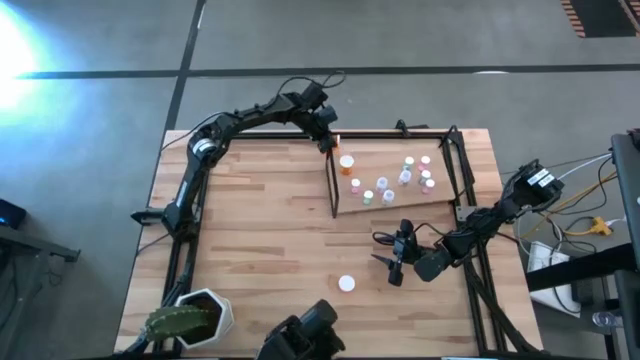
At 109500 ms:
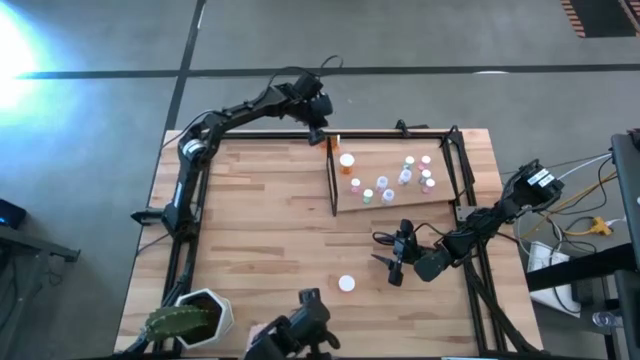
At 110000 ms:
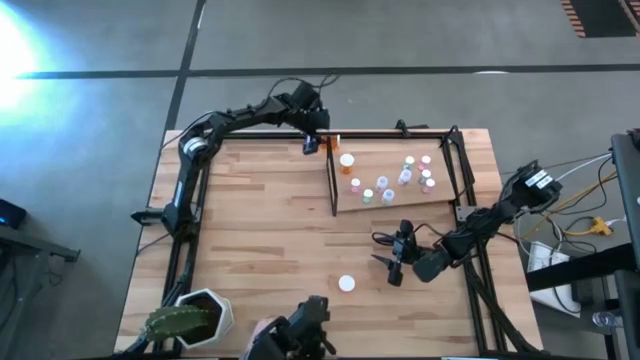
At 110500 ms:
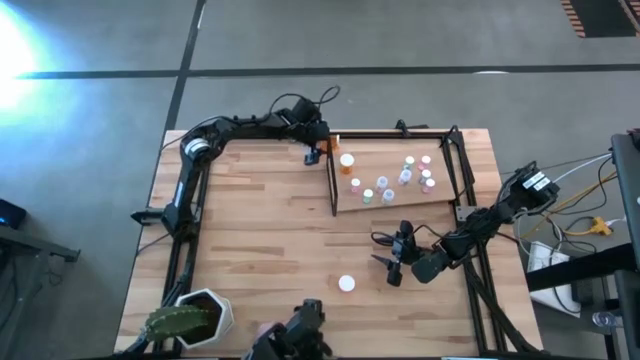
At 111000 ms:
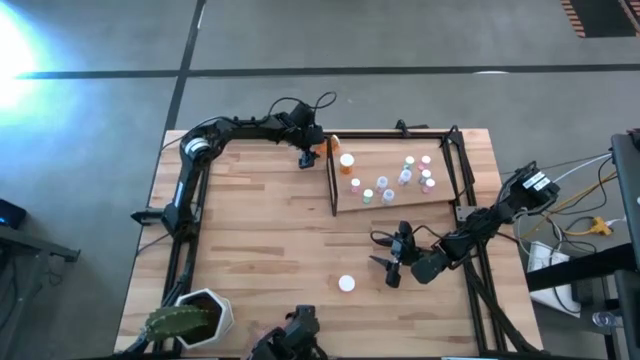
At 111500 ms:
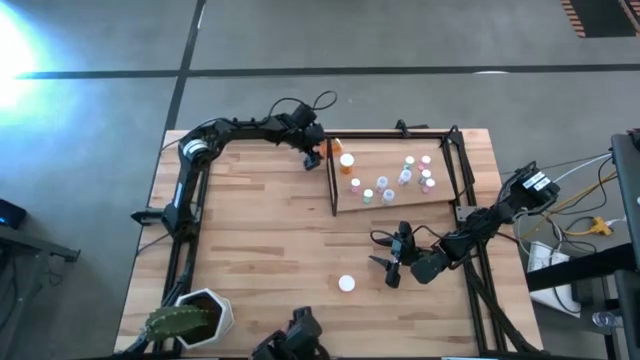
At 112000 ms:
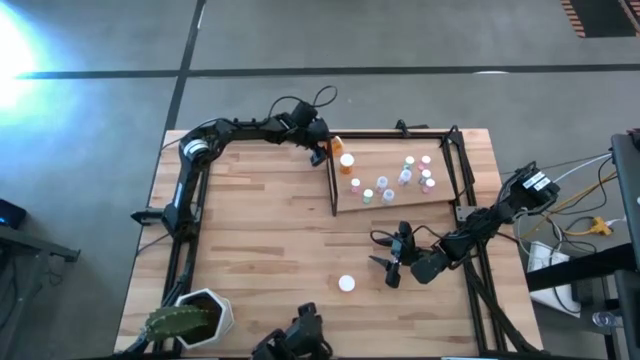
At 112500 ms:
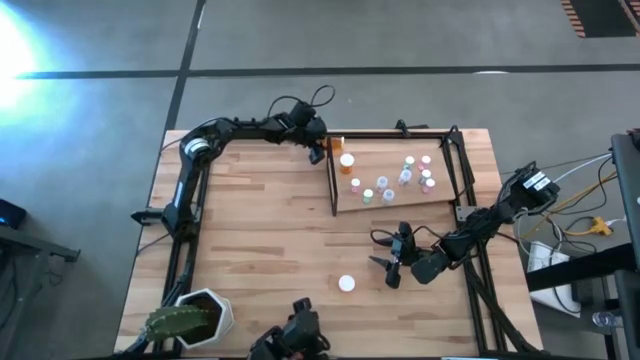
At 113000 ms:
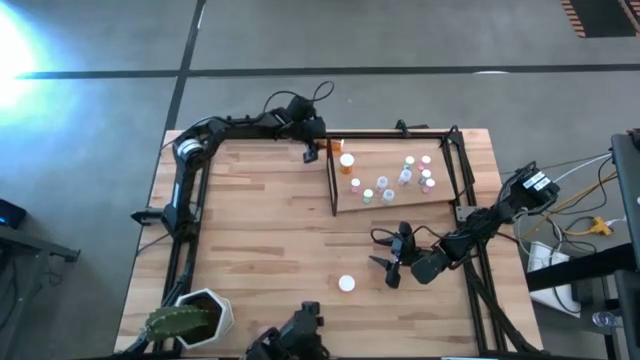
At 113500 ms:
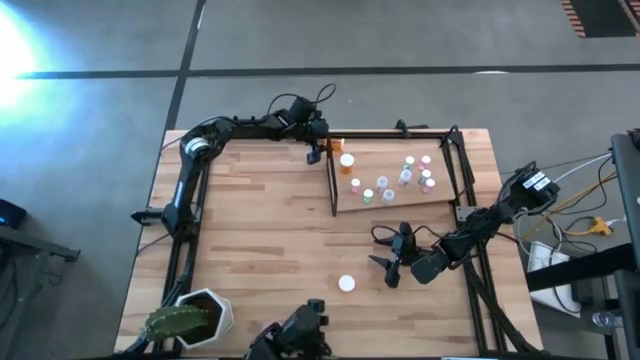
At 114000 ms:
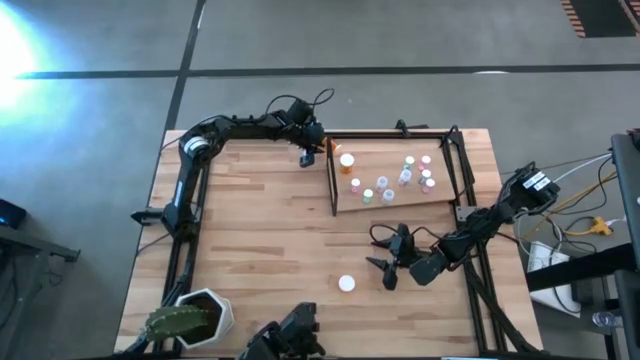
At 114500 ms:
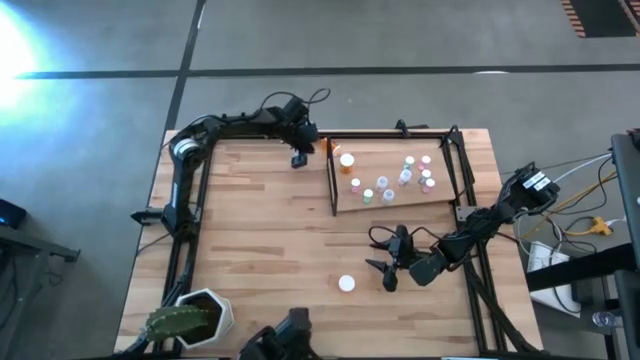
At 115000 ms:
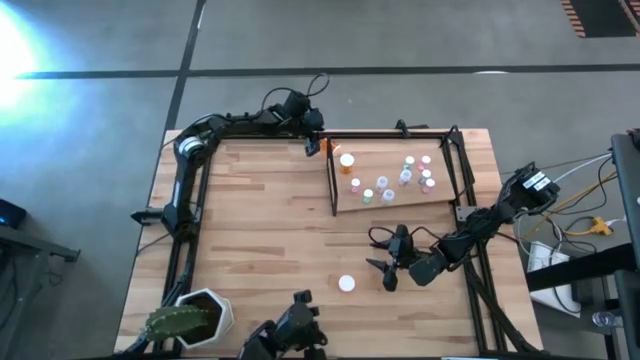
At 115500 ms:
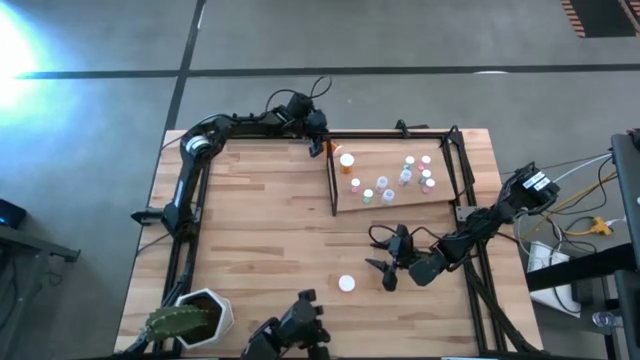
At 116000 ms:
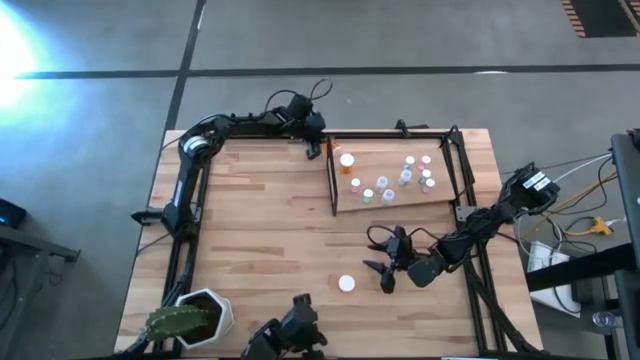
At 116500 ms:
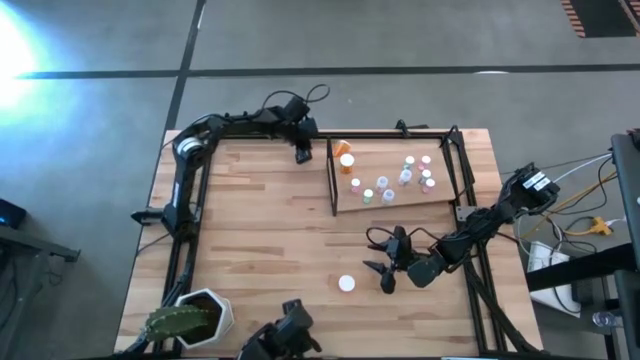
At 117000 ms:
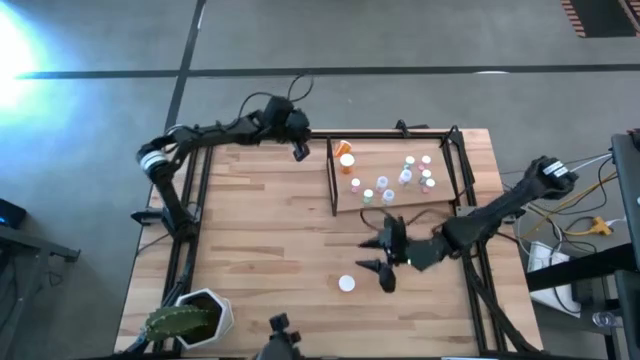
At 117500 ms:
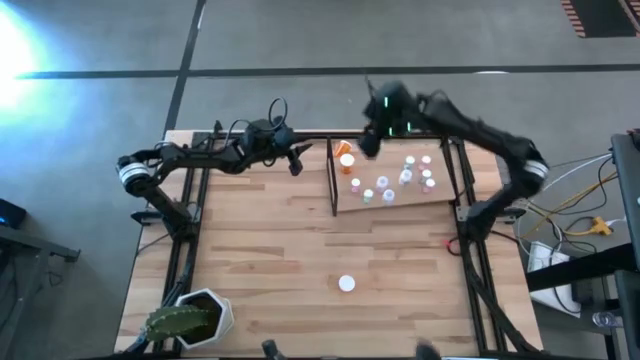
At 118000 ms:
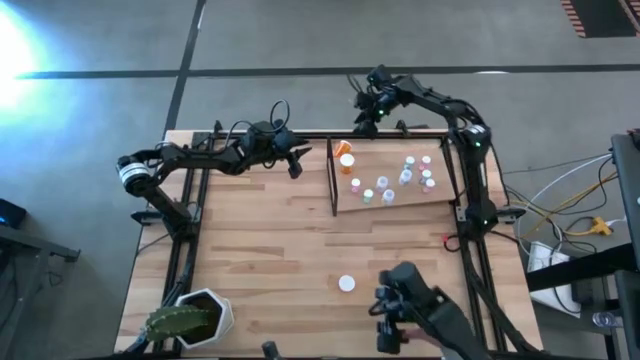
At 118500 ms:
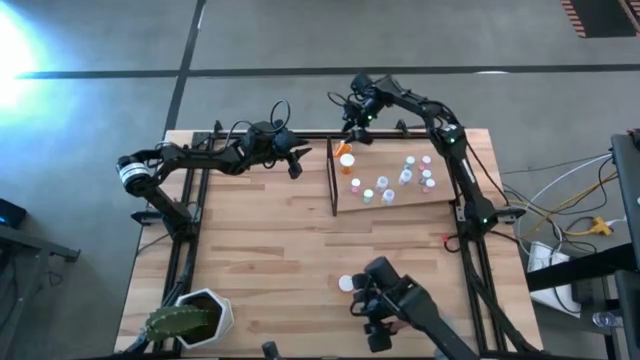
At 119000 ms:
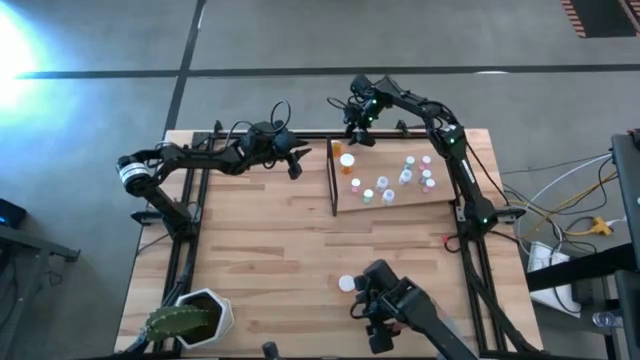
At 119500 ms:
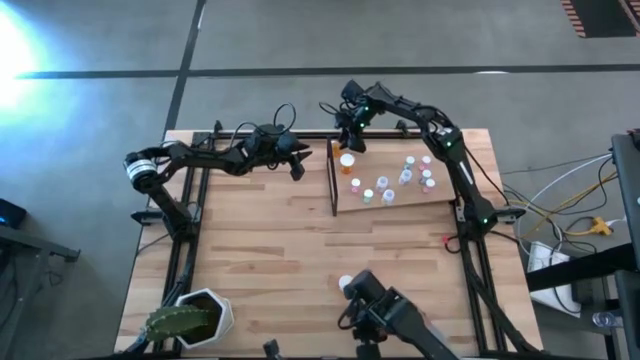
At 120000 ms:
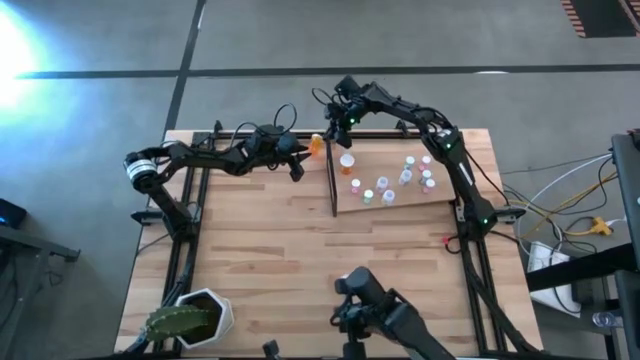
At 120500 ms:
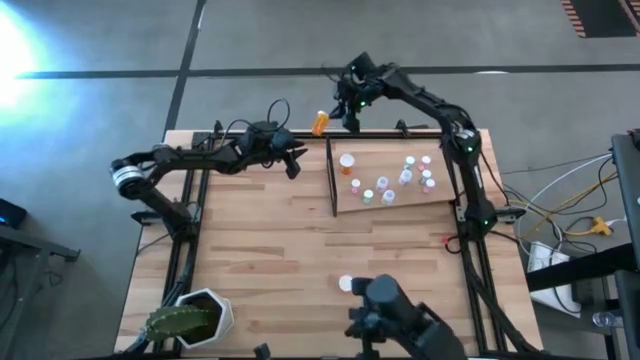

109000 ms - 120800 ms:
Task: Pick and place medicine bottles onto shelf by color
Put the top orange pill bottle on the shelf

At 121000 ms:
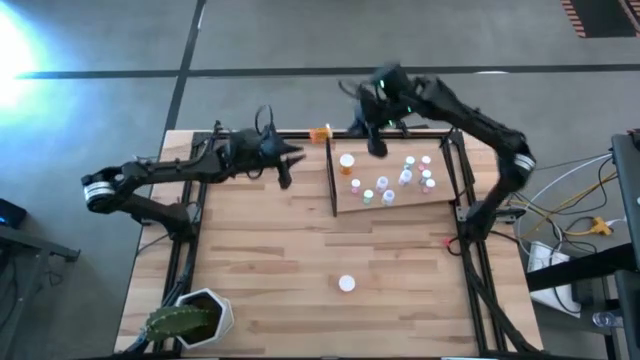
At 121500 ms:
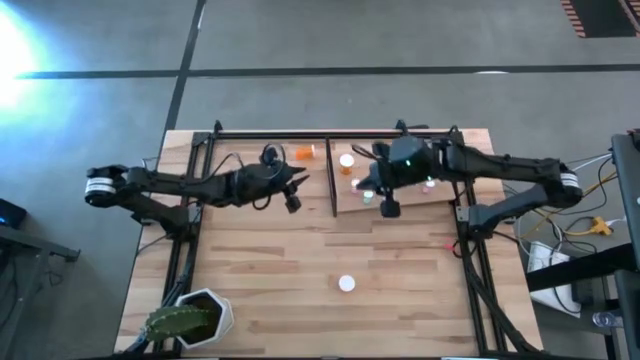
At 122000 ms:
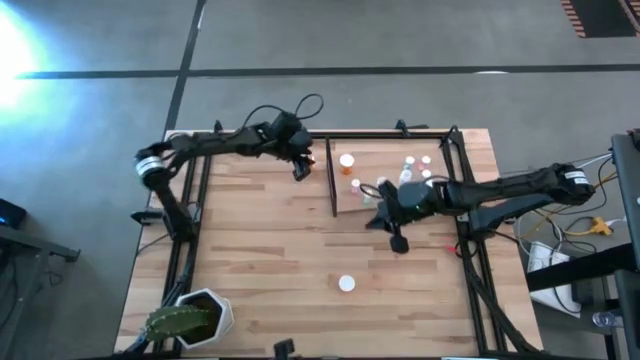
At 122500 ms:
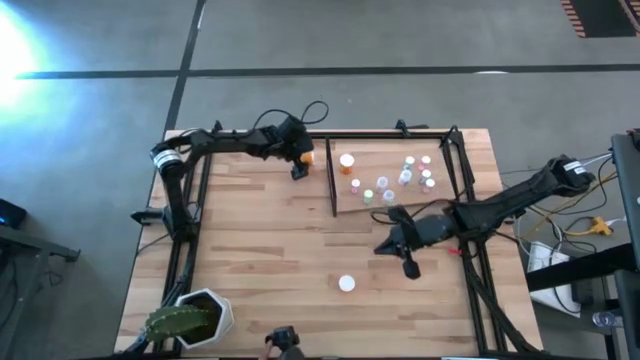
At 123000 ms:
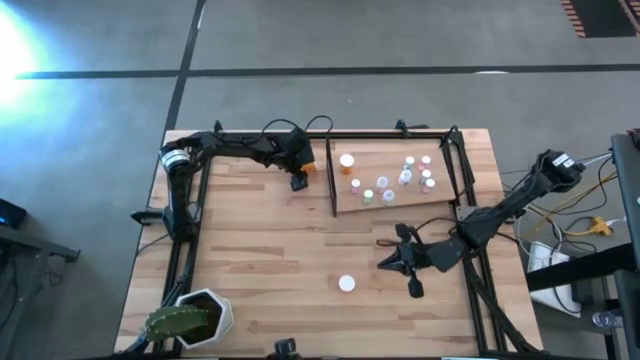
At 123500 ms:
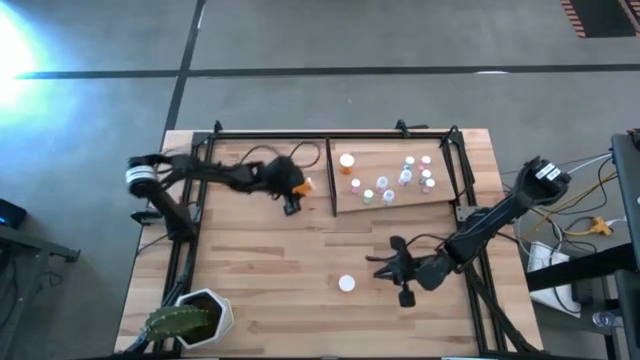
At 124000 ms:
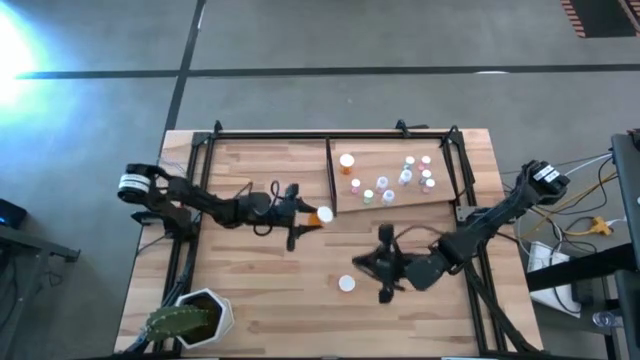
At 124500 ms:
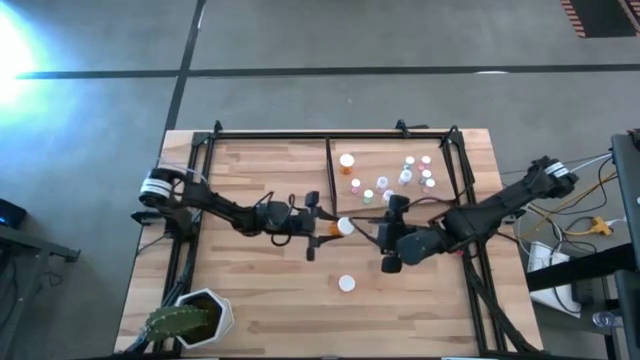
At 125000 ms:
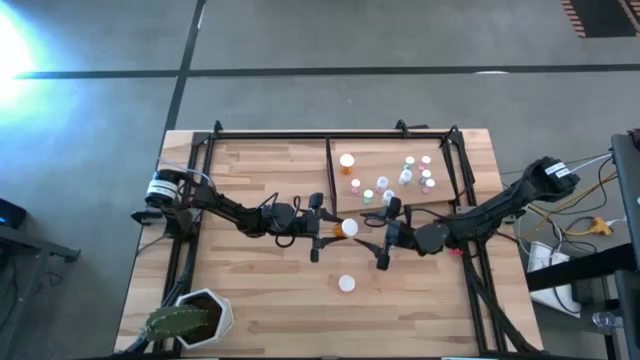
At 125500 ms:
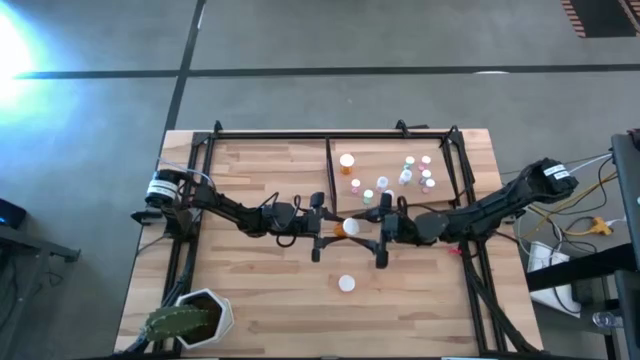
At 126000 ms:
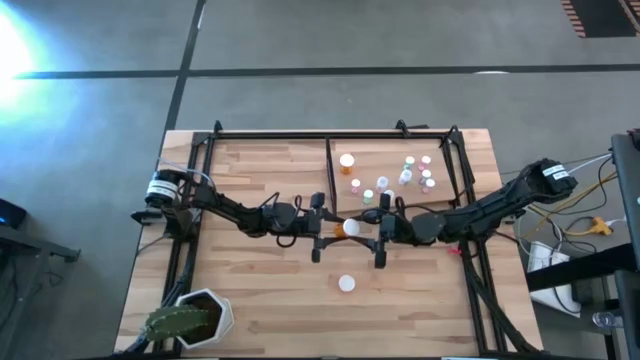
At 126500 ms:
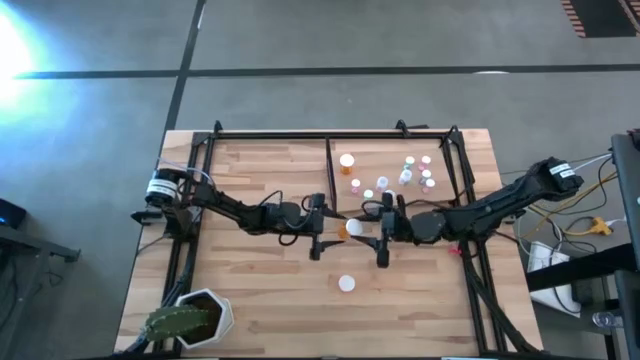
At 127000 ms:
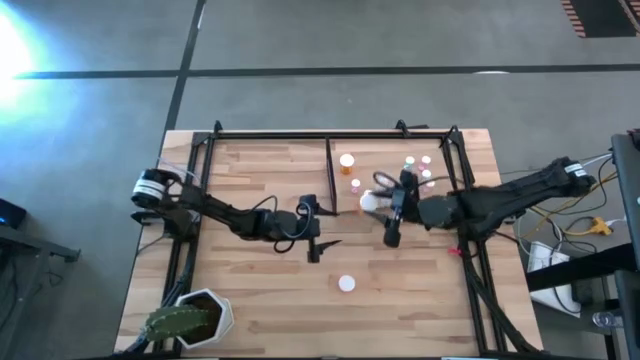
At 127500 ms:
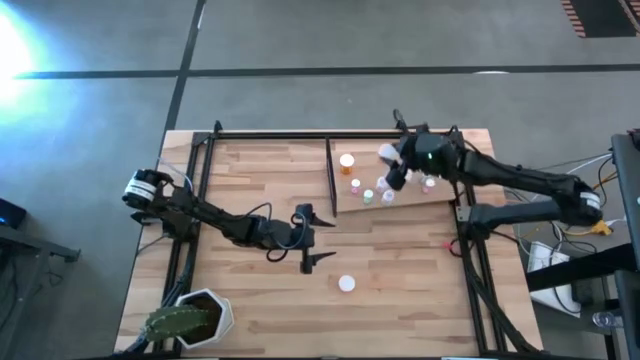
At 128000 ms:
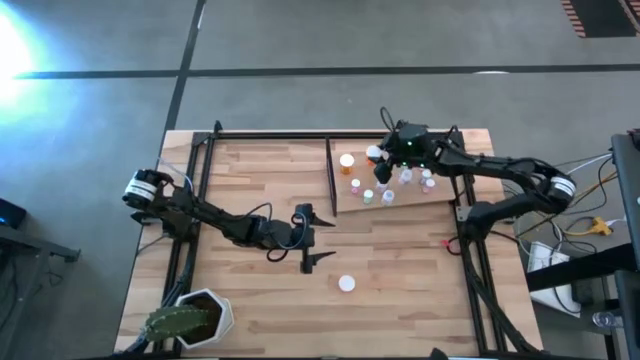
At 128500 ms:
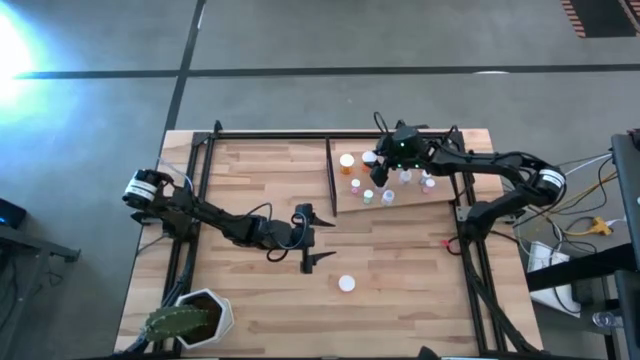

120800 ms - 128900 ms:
Put the top orange pill bottle on the shelf

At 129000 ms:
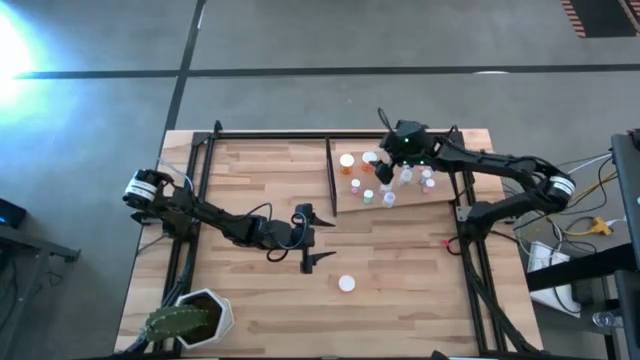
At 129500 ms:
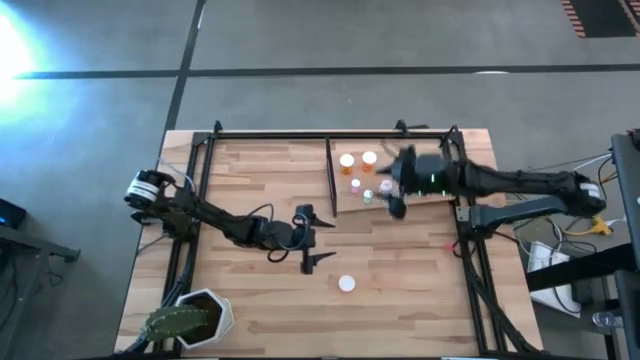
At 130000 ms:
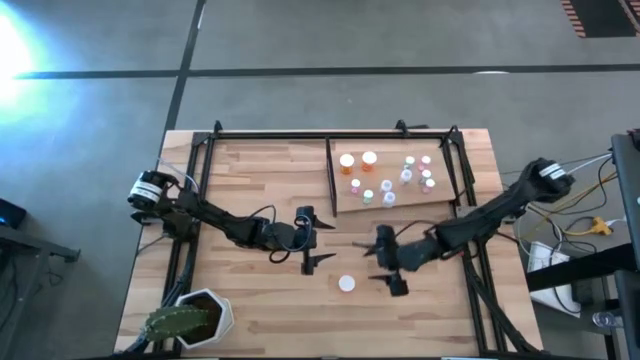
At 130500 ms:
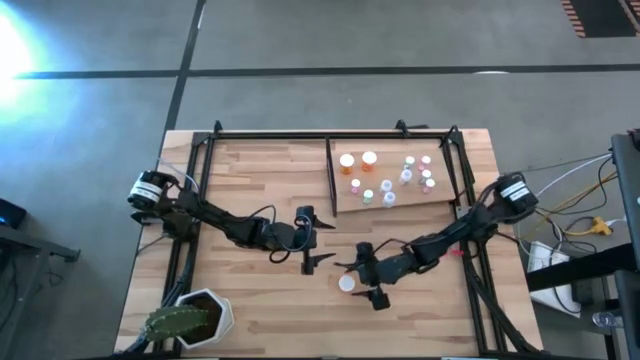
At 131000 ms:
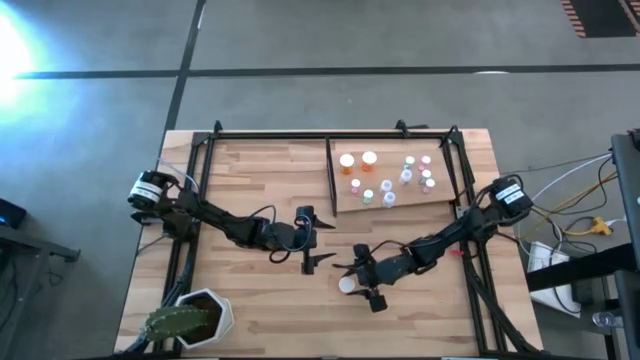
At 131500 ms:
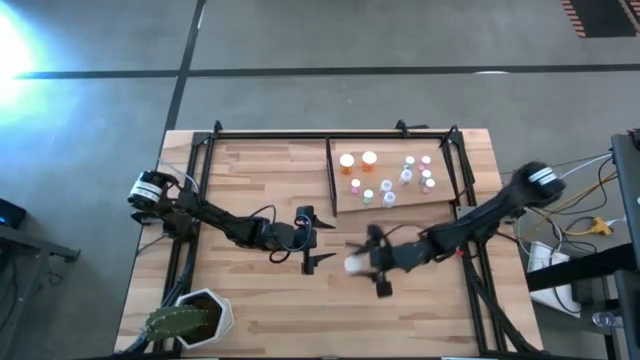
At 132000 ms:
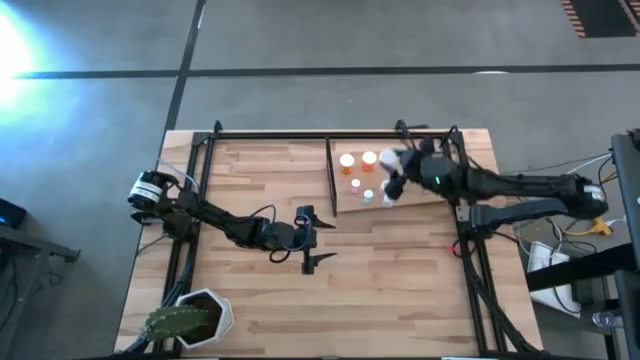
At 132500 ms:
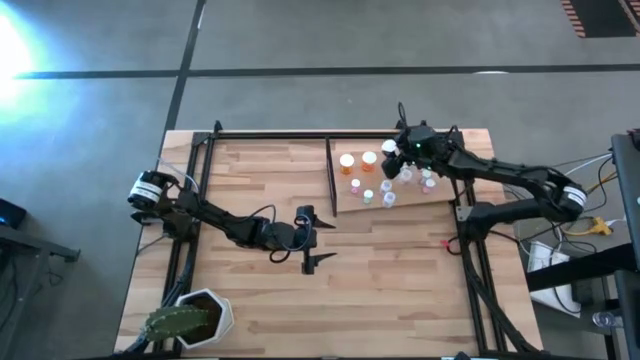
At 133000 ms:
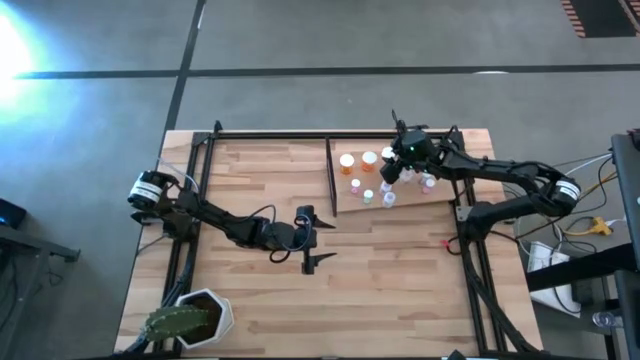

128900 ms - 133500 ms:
Put the orange pill bottle on the shelf
